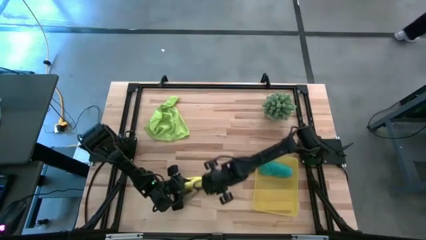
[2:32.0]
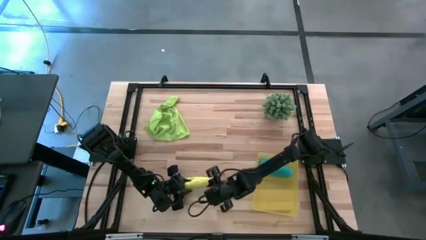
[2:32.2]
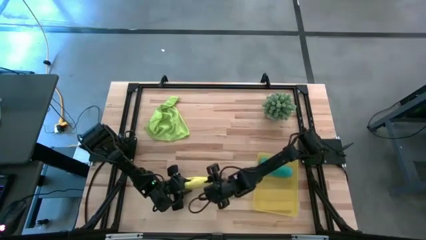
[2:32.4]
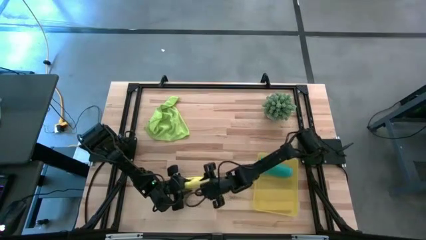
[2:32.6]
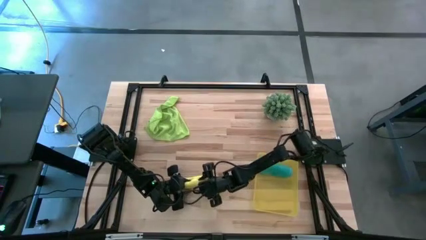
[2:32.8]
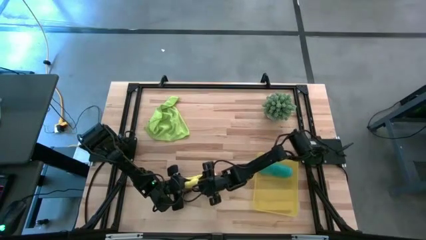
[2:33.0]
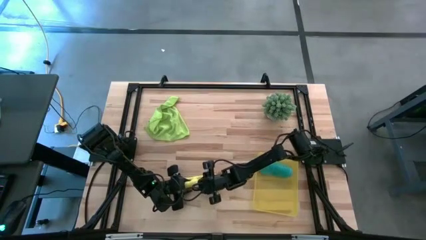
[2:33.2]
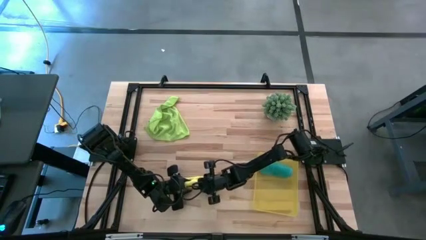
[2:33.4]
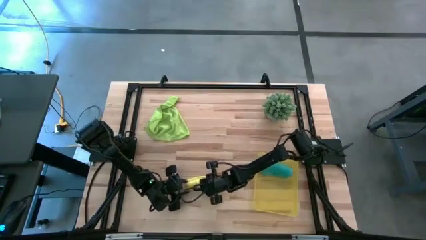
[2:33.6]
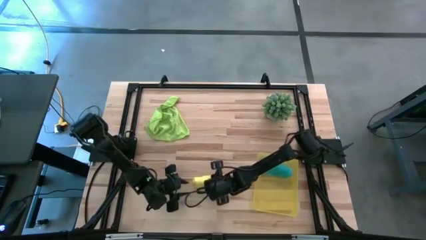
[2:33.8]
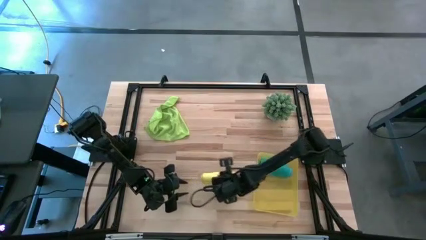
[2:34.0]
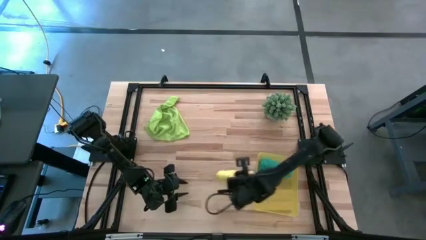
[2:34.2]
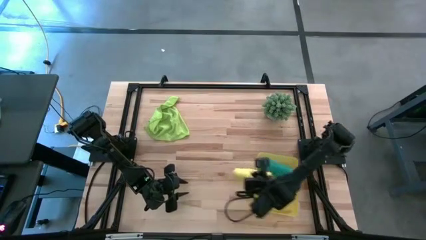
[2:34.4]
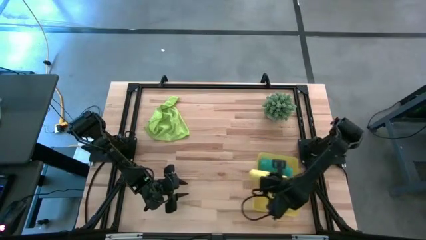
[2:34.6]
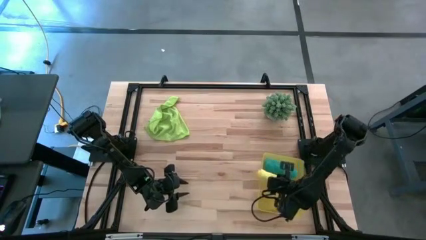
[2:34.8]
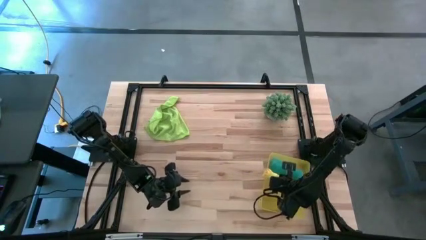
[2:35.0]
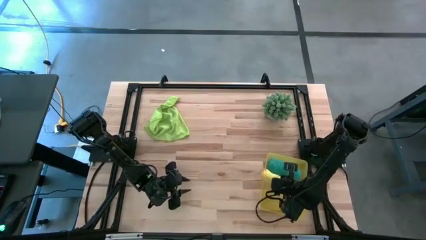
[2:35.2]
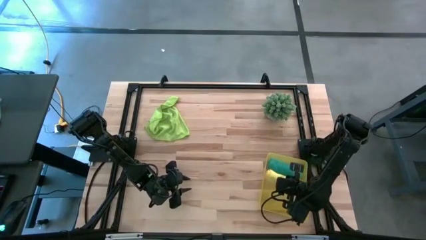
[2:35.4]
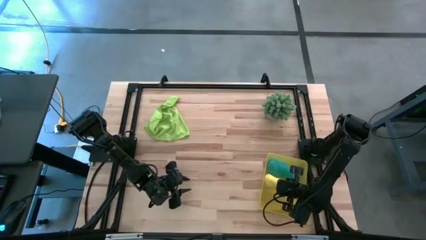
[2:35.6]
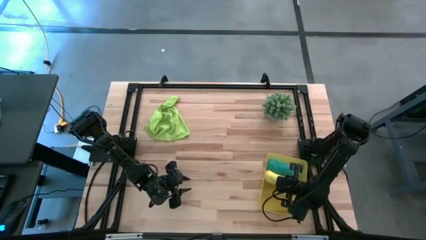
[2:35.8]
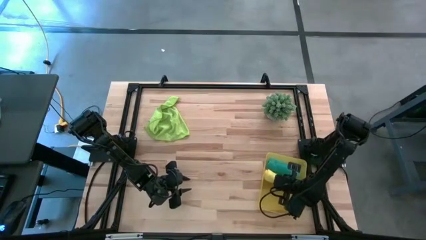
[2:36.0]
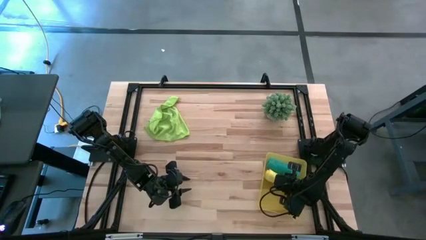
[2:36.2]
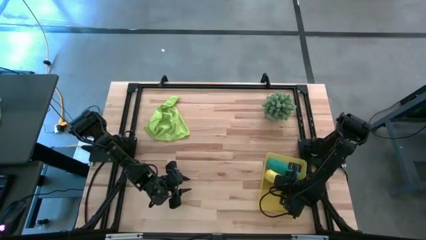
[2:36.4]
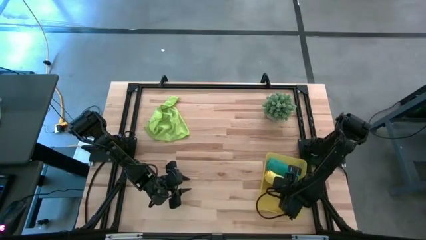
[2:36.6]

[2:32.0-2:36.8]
Task: Roll microfiber towels into tight, uniform cylinder then place into a basket
Put the yellow microfiber cloth into the yellow bin

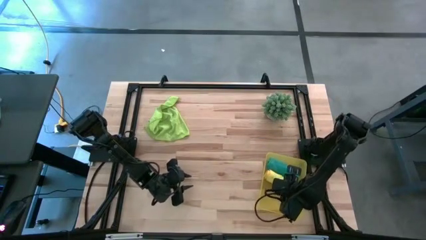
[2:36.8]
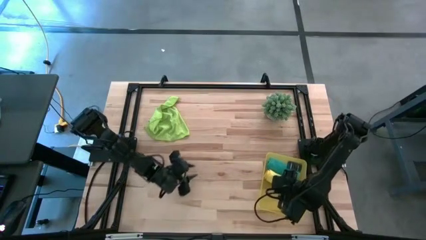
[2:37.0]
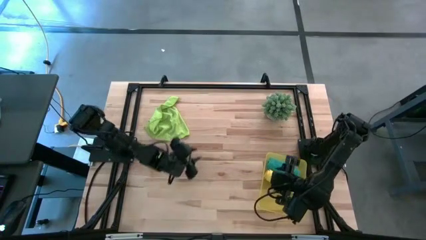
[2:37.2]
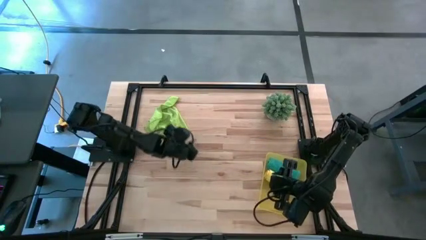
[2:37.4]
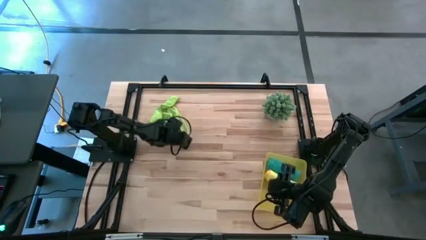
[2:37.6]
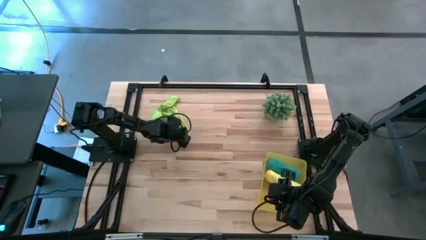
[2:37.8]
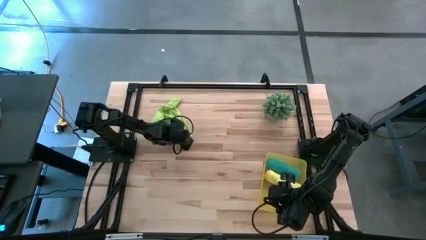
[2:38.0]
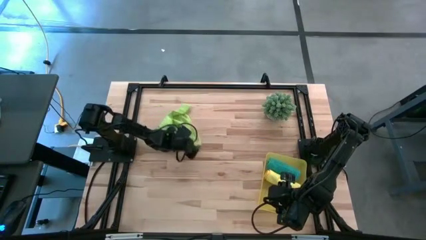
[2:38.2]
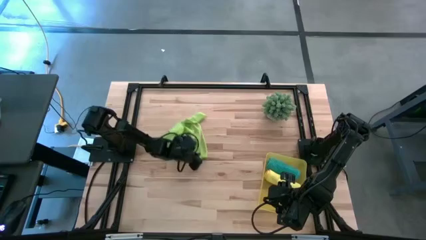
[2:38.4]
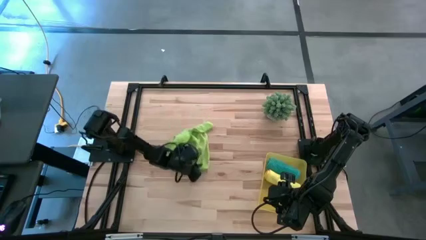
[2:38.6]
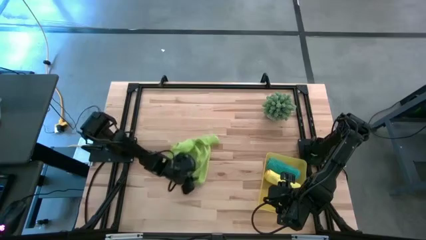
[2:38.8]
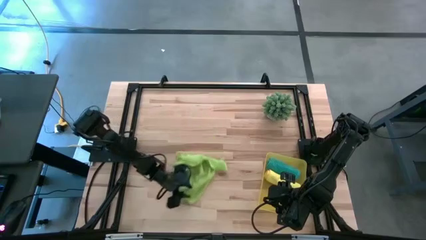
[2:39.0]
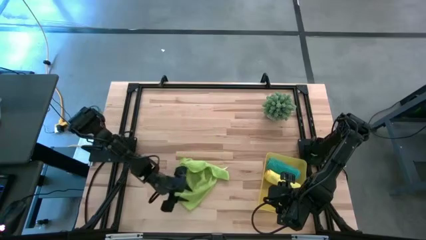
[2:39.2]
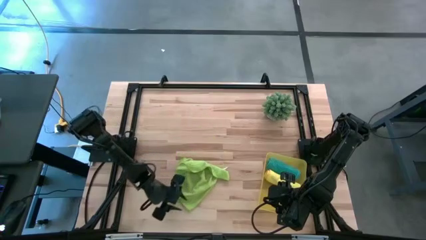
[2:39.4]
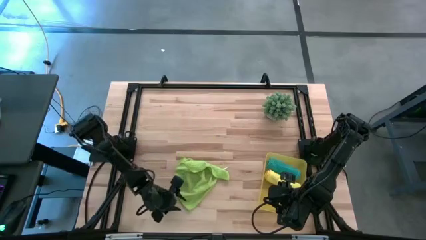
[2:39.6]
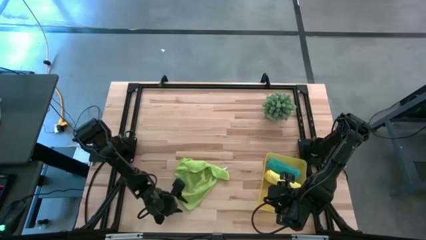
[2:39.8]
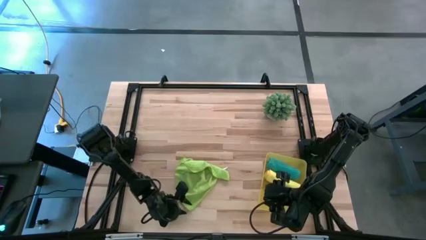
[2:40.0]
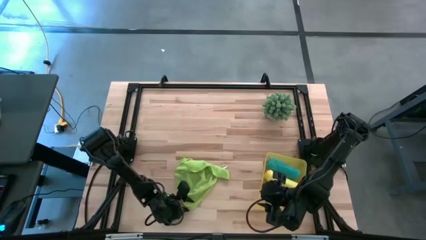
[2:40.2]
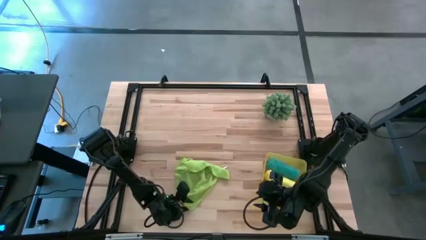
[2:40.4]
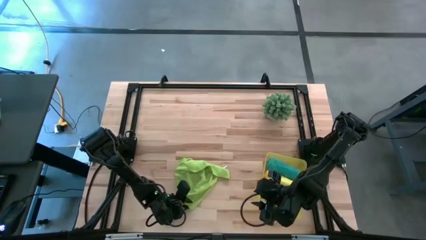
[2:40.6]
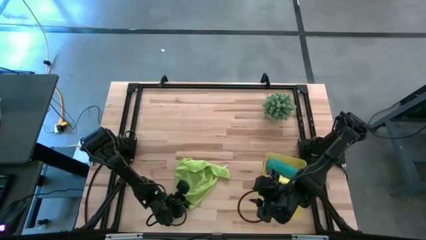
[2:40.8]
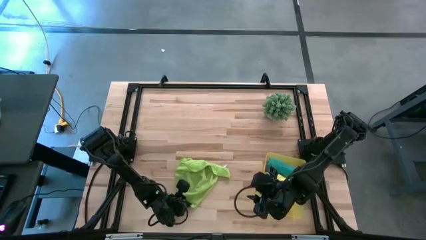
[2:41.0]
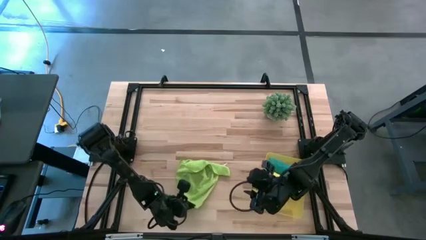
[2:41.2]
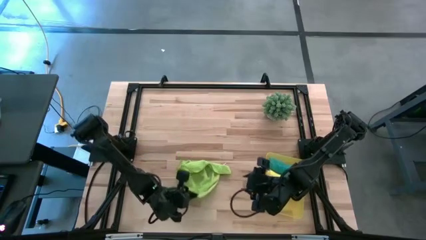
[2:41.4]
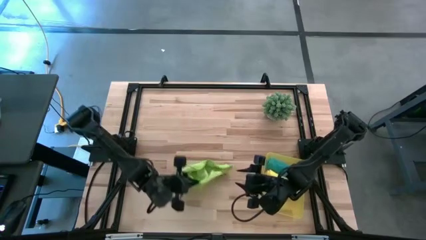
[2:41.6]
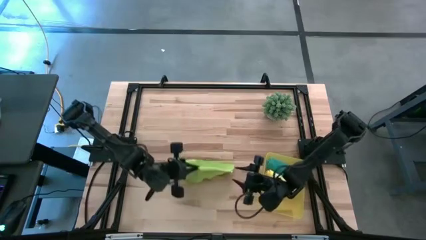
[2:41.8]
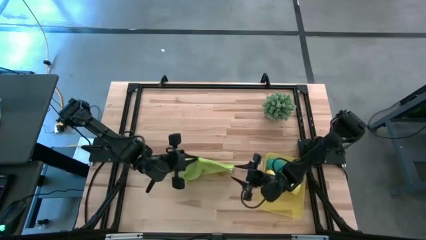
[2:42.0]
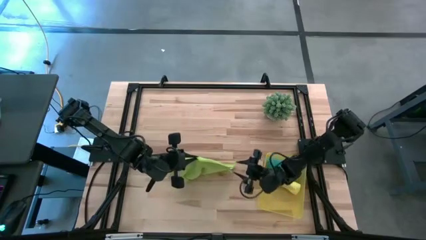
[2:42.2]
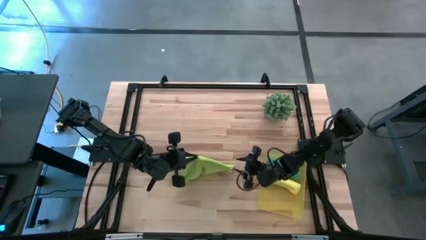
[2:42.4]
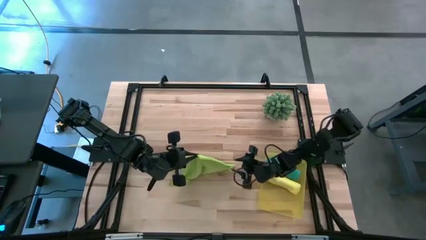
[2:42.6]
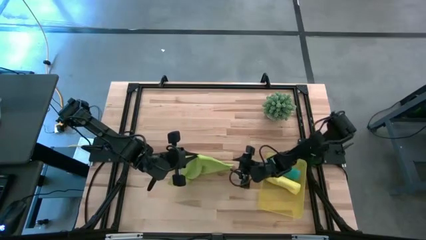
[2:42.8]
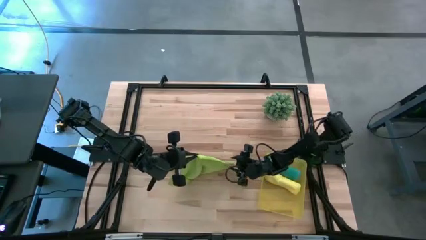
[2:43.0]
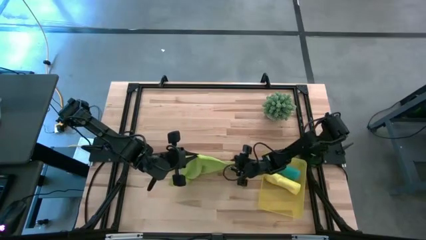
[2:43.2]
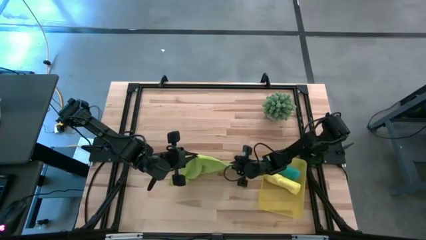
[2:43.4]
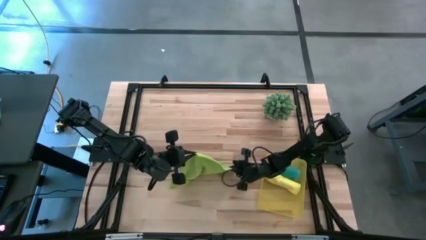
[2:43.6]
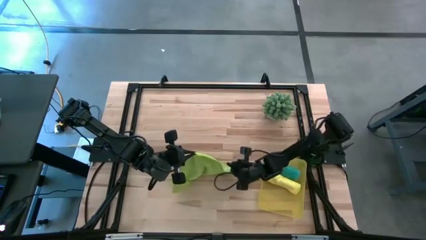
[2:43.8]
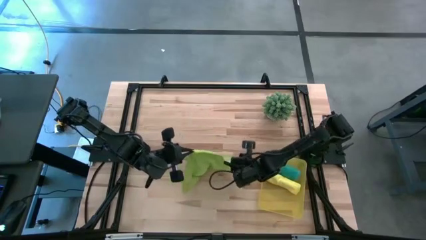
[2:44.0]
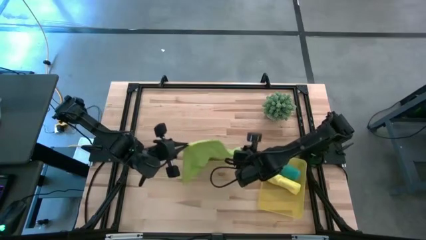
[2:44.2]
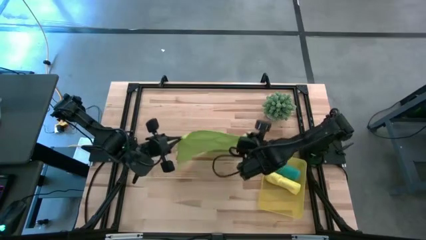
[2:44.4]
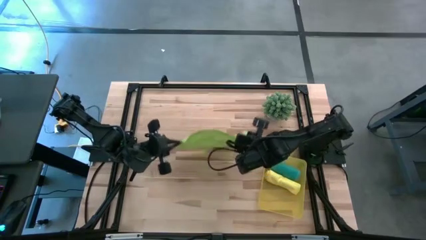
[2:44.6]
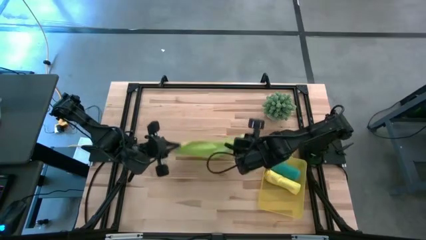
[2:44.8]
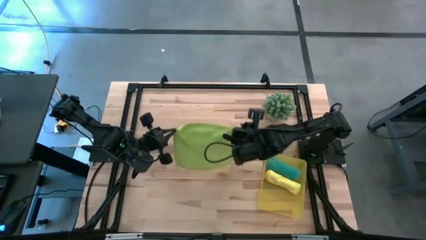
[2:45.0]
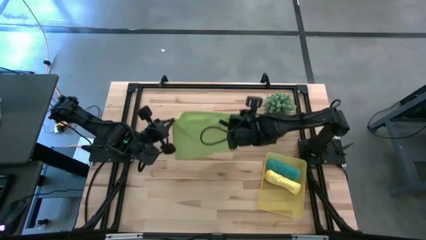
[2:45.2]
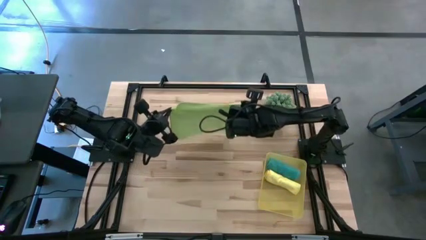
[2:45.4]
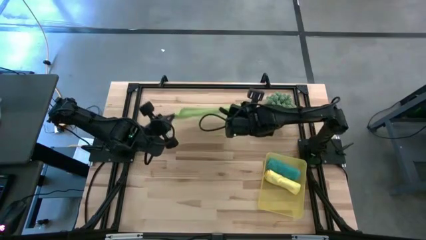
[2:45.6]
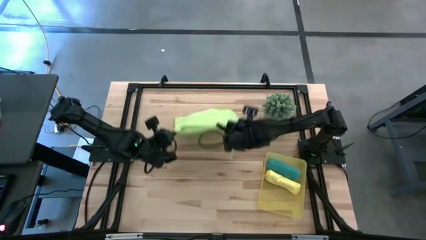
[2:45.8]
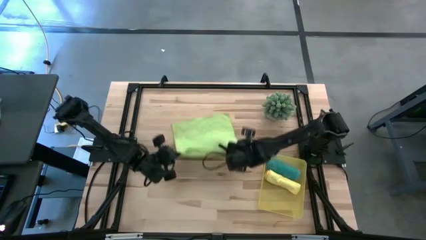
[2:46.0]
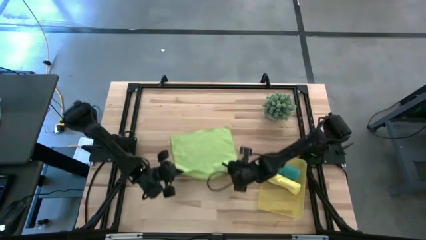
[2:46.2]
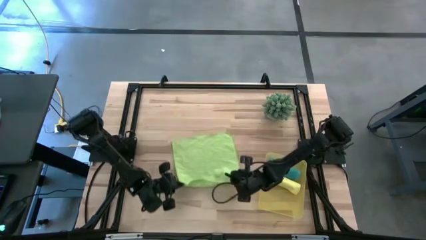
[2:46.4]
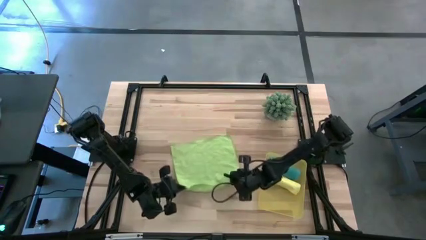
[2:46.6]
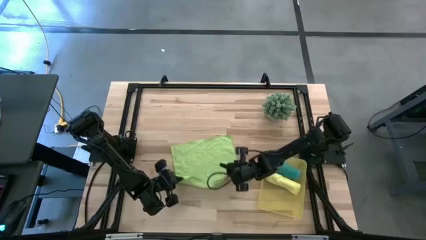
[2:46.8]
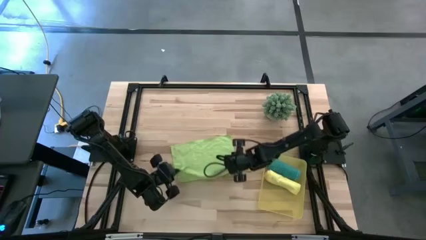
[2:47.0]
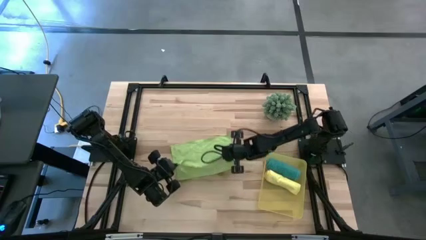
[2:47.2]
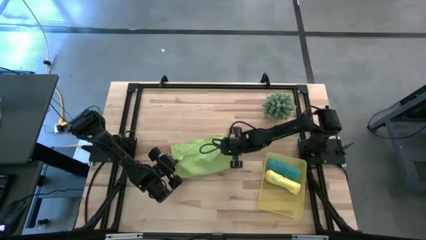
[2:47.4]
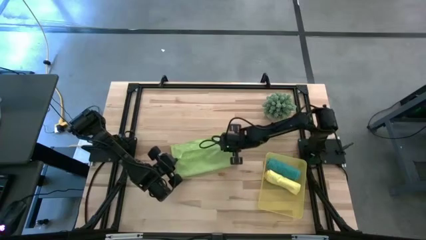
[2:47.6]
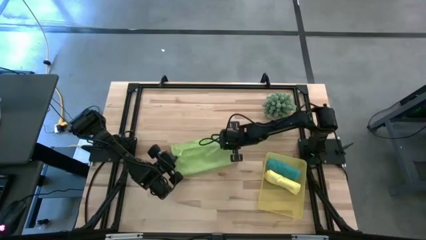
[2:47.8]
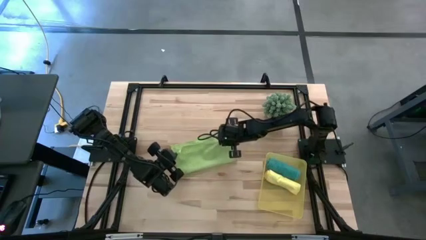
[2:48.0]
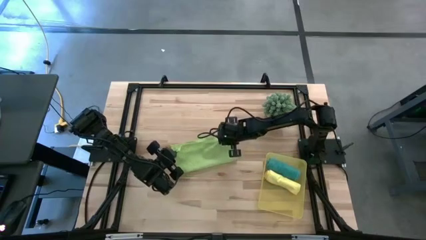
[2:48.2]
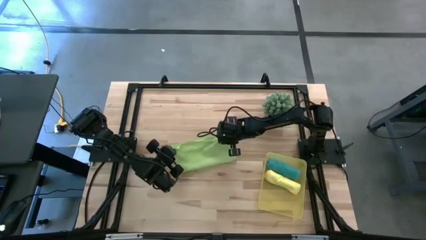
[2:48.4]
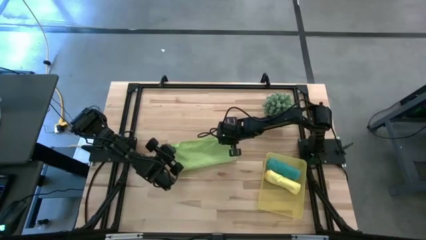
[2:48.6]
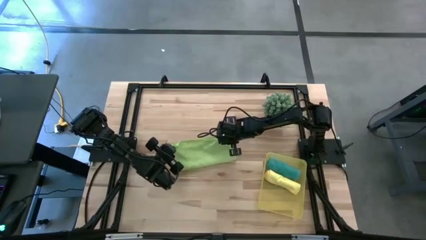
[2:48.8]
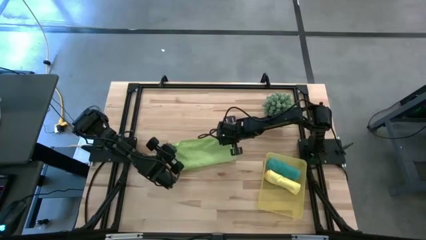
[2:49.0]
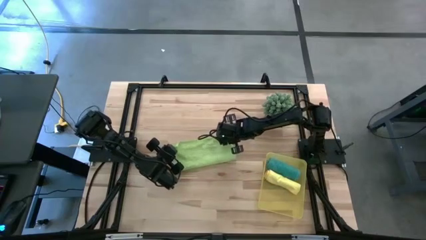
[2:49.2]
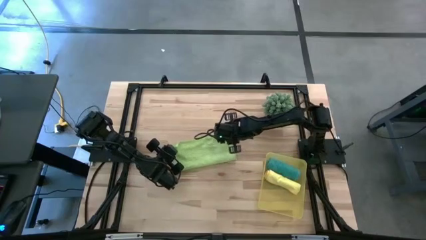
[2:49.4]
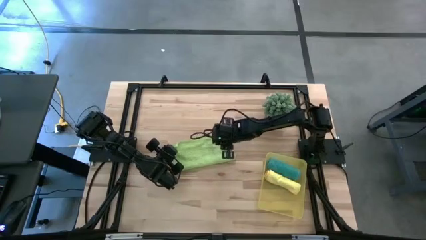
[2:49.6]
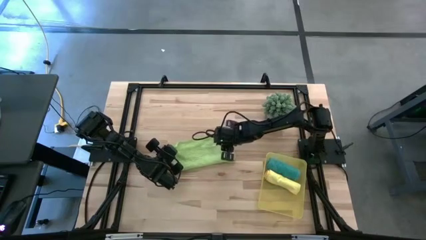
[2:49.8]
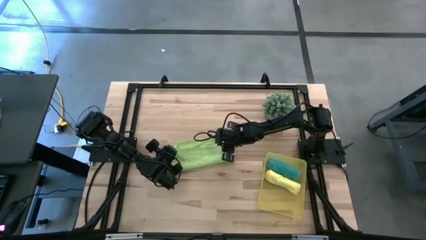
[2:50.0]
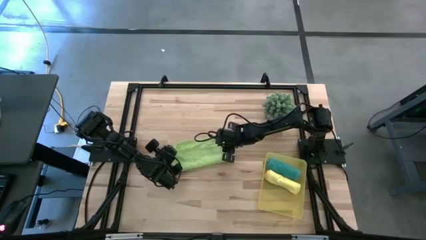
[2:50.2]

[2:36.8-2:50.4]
Fold the green microfiber cloth
